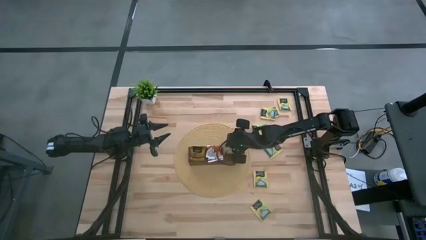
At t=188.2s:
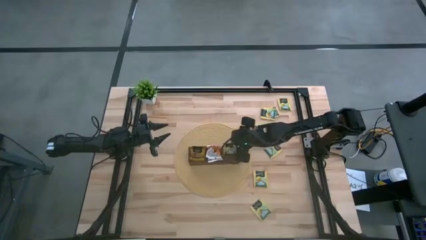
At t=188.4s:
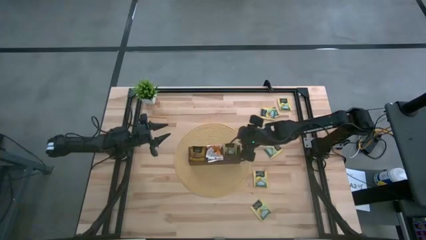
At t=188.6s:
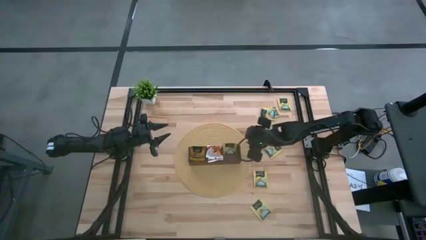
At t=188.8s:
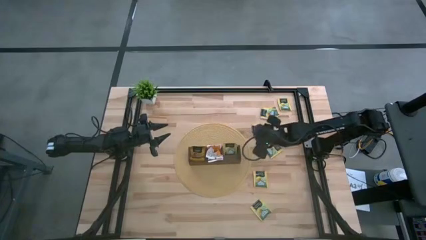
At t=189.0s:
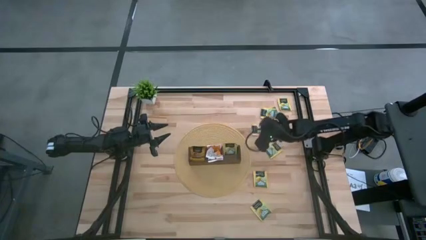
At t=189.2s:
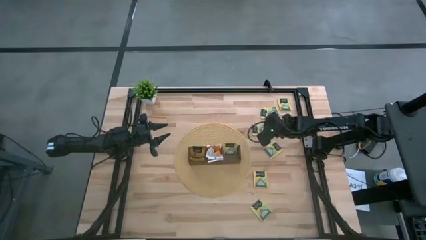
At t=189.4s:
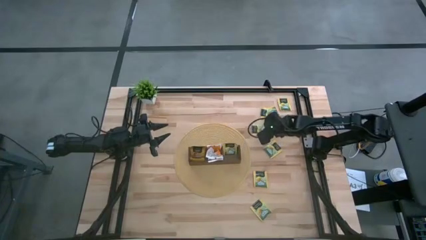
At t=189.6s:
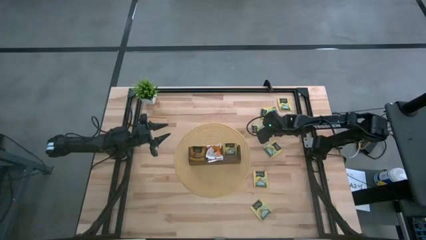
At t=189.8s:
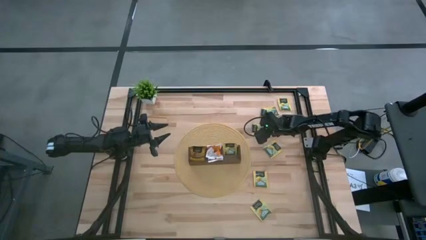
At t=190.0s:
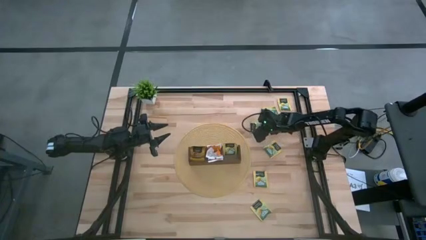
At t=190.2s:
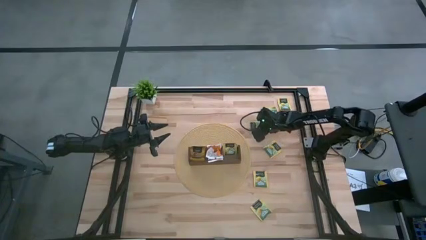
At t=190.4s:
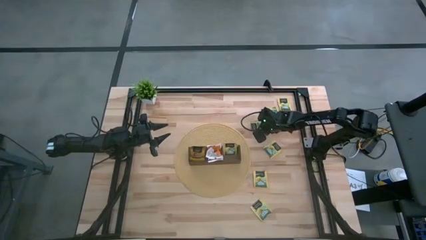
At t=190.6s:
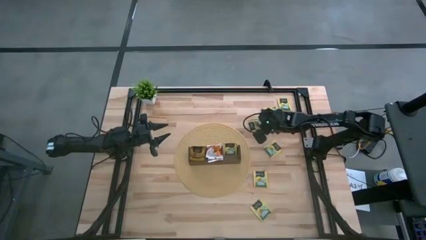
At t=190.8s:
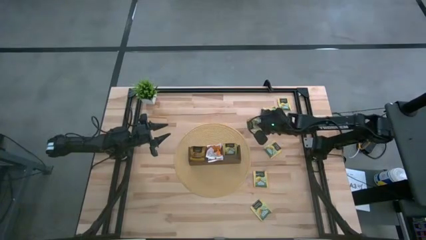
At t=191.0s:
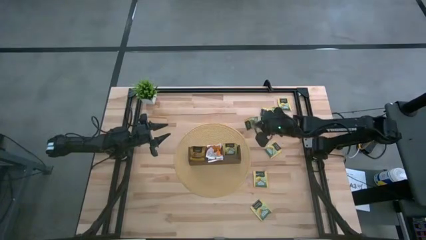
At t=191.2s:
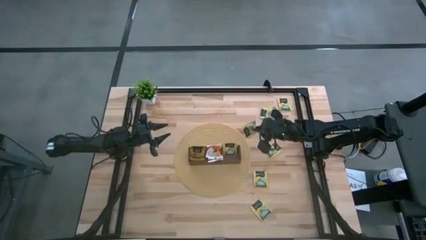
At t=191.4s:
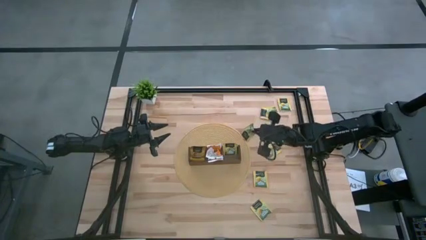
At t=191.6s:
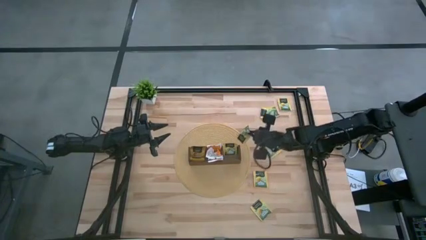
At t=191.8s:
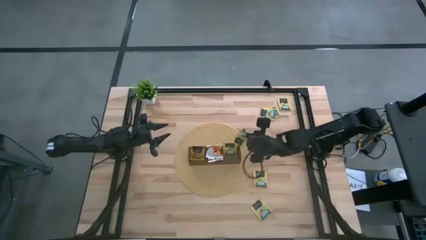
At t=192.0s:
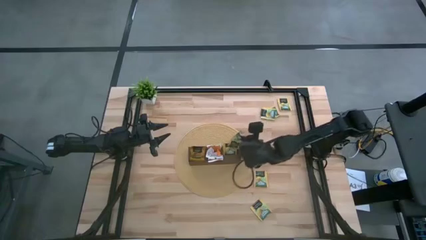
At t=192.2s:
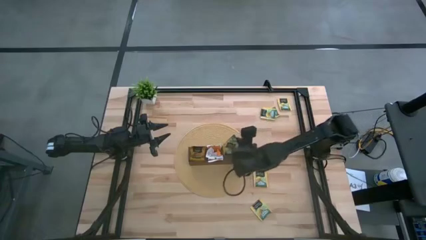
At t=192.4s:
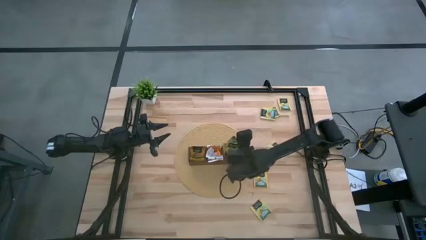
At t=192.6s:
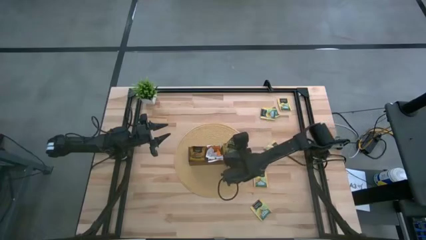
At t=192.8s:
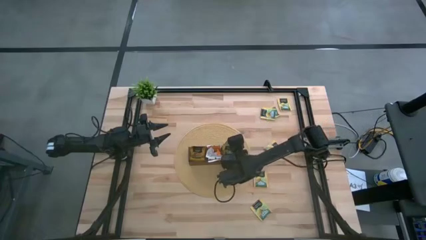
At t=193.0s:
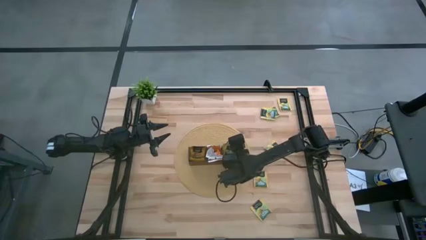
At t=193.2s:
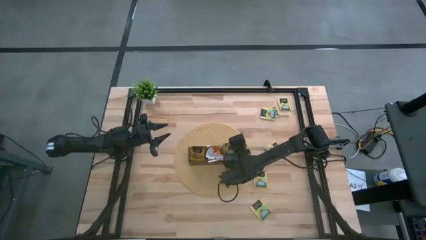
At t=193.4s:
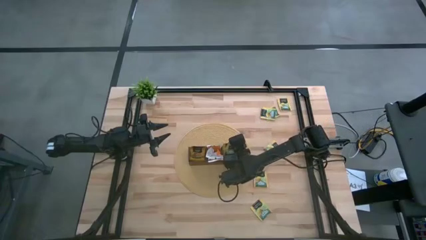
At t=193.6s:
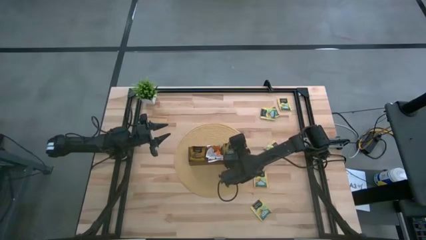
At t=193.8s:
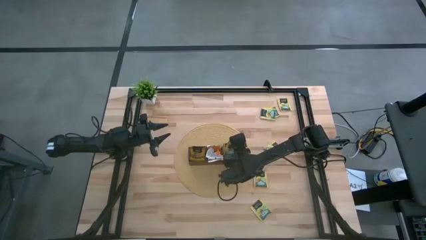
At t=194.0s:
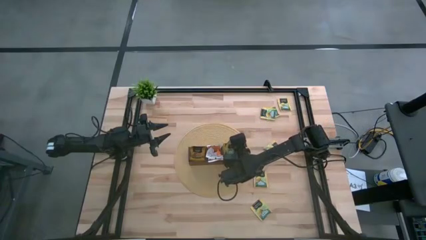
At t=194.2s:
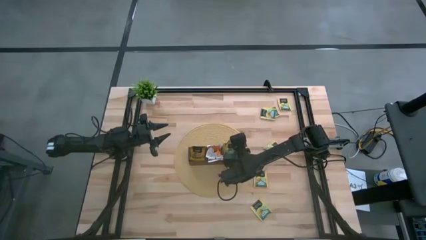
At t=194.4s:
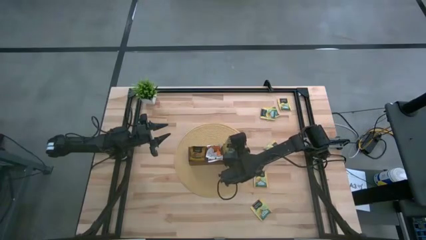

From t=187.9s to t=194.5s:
Task: Pick & Place Tea
Put the lemon tea sachet into the right section of the wooden organizer

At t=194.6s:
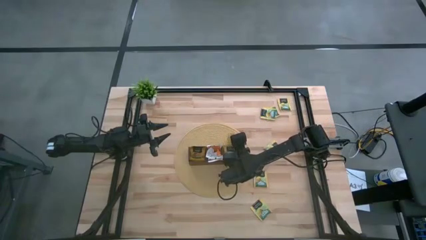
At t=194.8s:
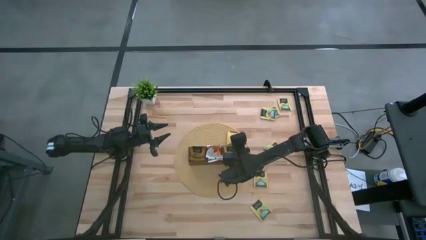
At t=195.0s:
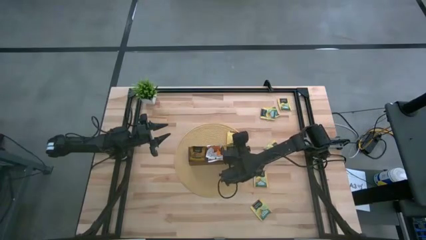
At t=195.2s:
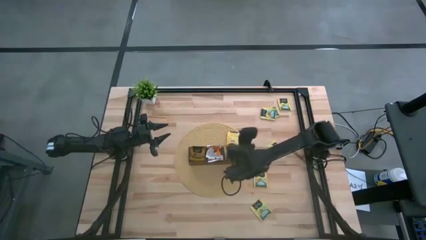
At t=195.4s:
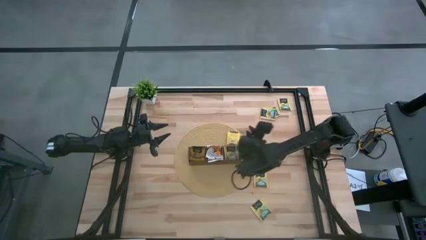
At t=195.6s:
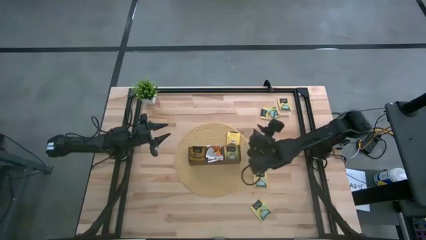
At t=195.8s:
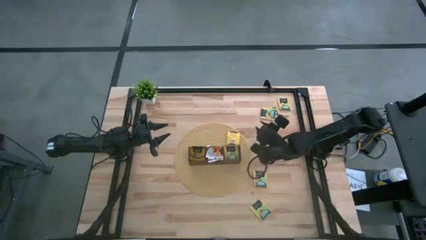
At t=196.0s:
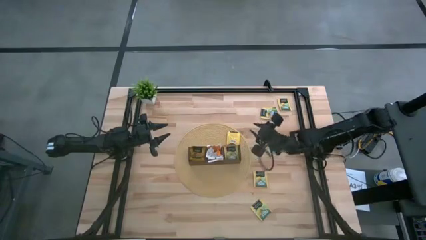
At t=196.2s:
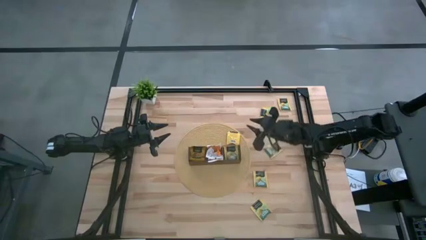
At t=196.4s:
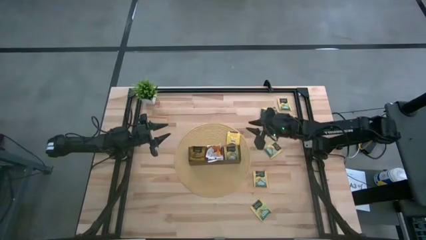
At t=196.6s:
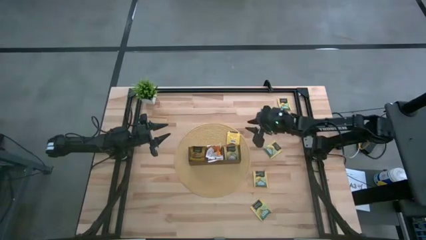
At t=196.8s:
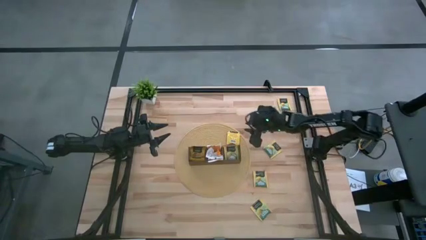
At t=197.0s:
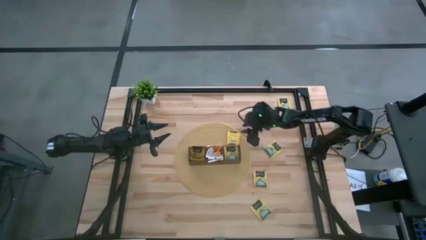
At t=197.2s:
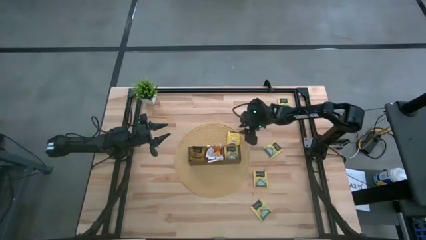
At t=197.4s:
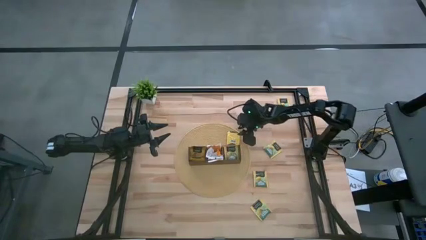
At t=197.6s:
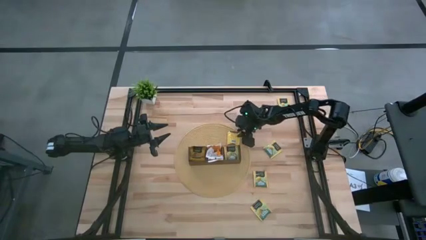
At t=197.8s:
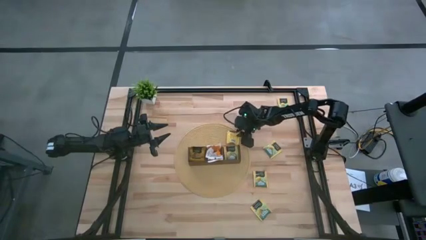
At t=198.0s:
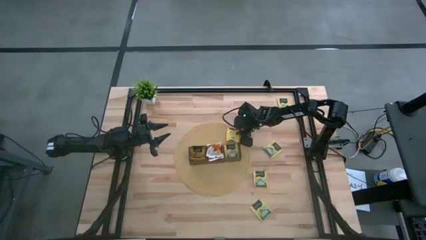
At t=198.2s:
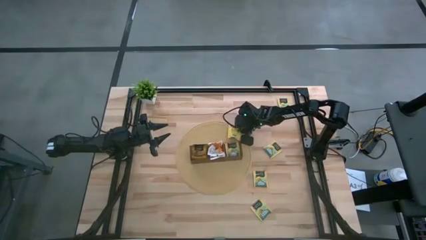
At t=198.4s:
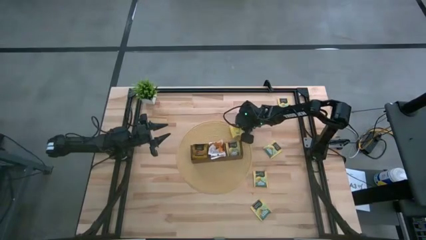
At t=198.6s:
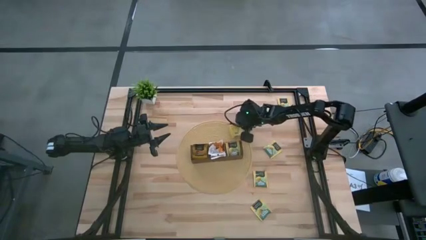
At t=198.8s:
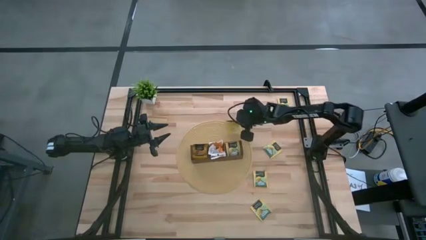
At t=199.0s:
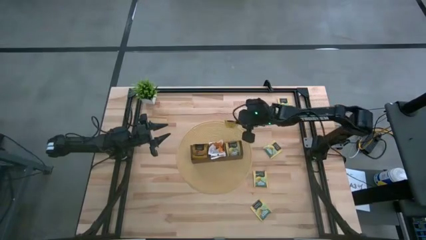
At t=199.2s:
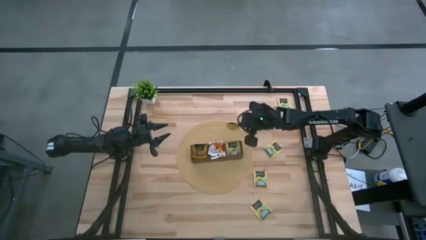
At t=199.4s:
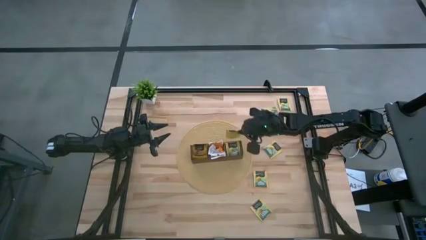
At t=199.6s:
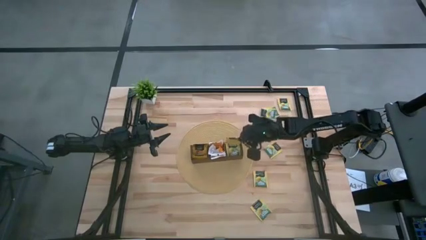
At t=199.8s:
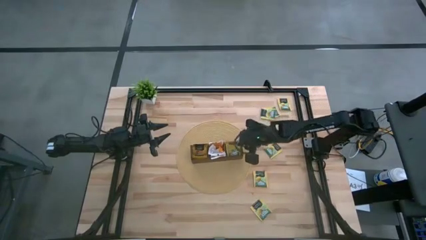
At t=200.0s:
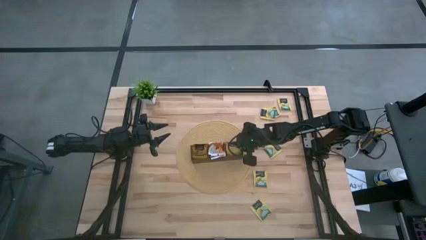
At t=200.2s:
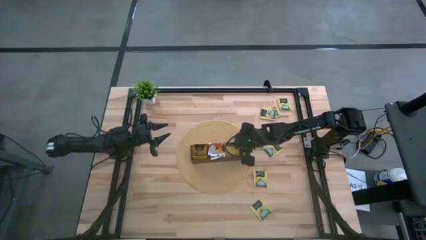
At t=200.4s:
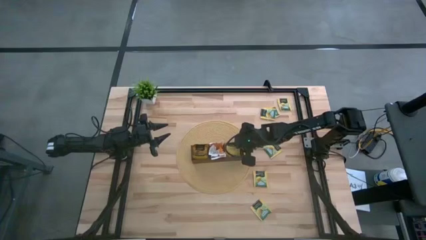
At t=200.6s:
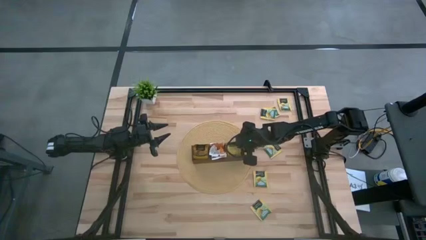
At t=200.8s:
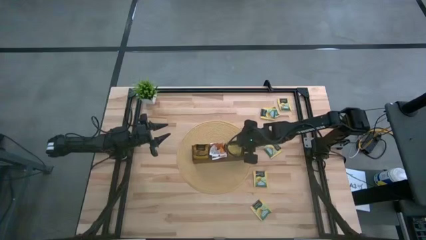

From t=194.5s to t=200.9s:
Put the lemon tea sachet into the right section of the wooden organizer
